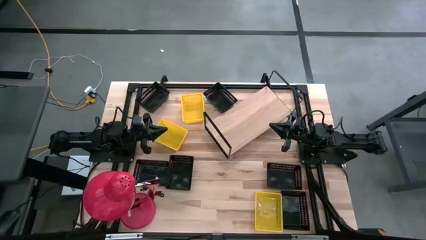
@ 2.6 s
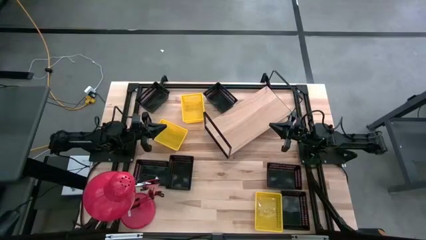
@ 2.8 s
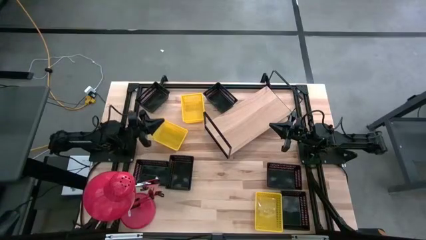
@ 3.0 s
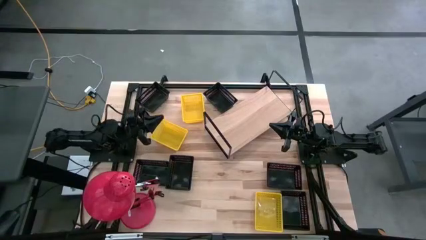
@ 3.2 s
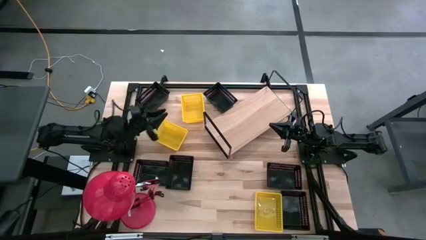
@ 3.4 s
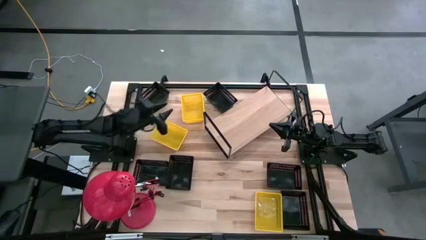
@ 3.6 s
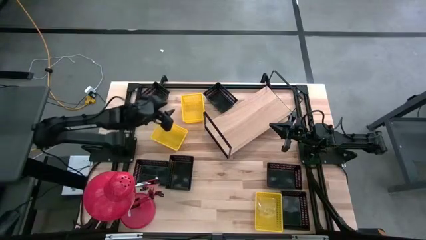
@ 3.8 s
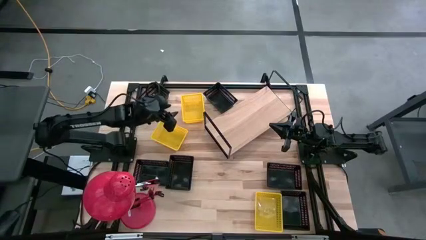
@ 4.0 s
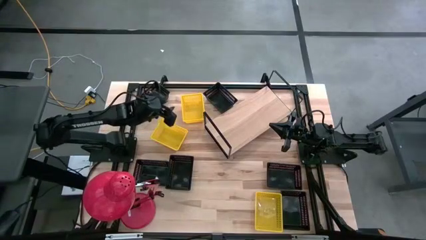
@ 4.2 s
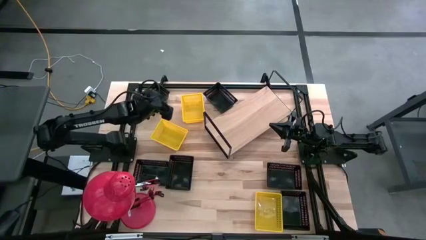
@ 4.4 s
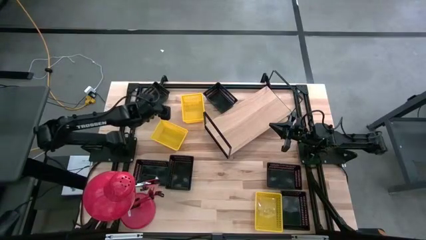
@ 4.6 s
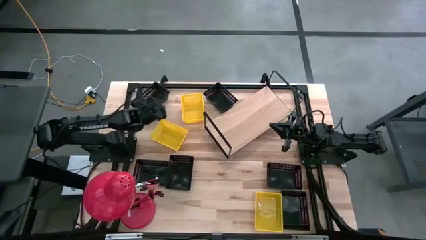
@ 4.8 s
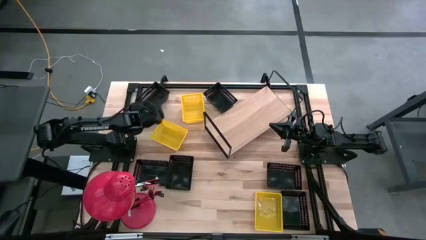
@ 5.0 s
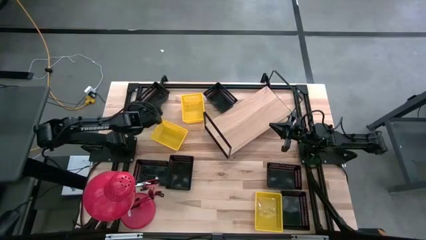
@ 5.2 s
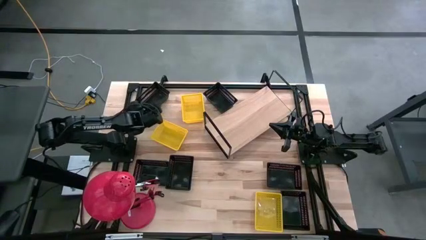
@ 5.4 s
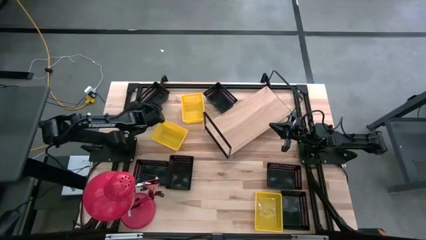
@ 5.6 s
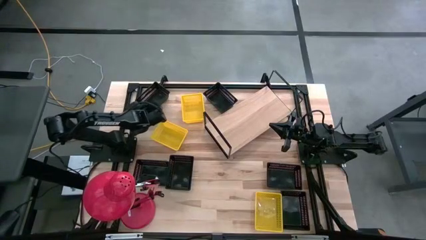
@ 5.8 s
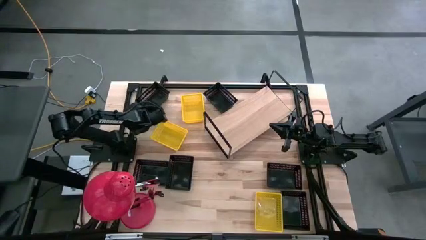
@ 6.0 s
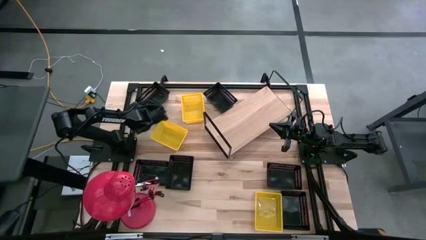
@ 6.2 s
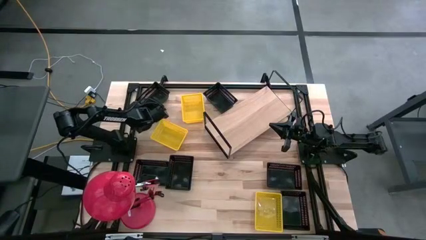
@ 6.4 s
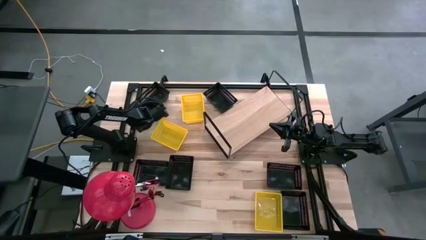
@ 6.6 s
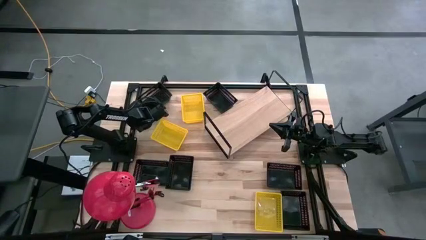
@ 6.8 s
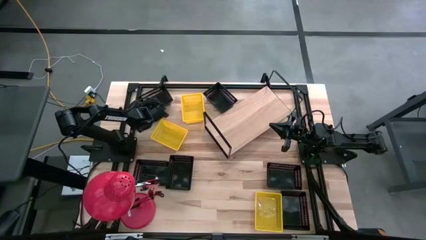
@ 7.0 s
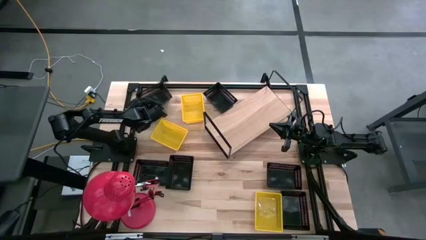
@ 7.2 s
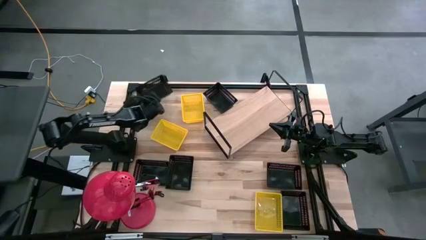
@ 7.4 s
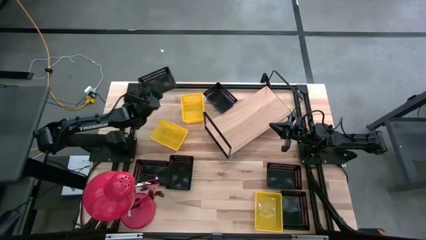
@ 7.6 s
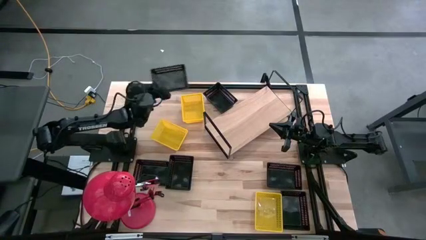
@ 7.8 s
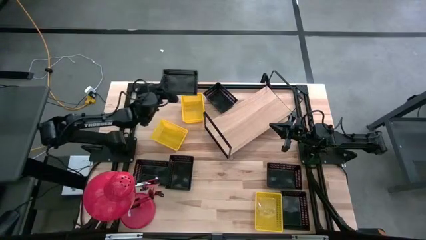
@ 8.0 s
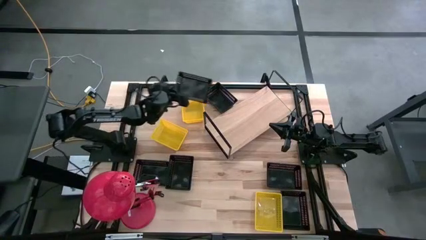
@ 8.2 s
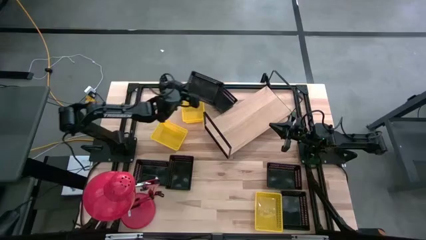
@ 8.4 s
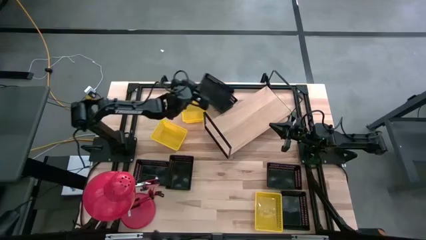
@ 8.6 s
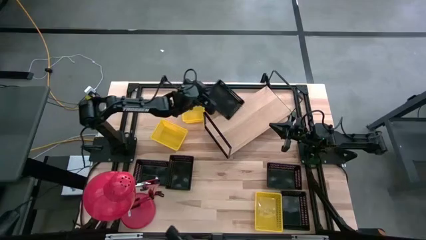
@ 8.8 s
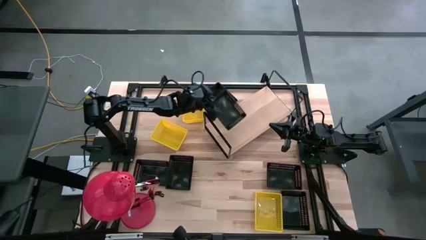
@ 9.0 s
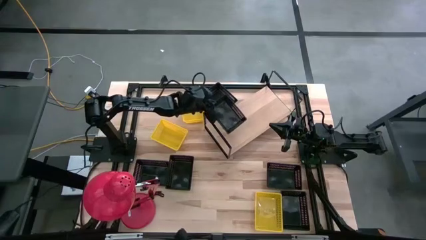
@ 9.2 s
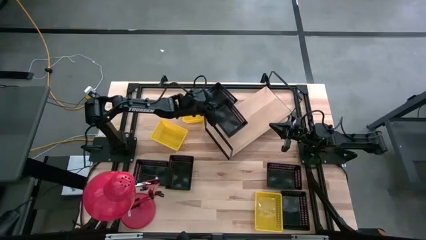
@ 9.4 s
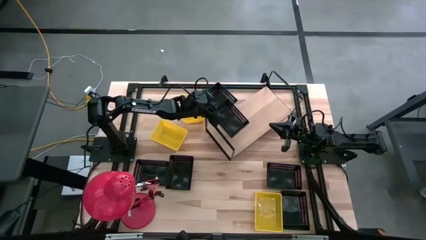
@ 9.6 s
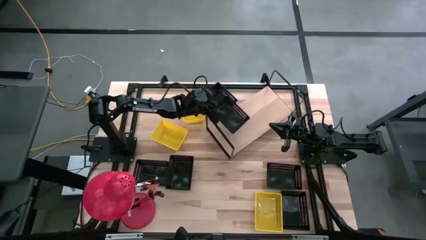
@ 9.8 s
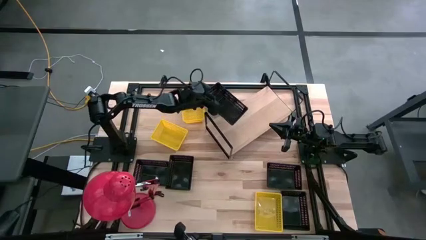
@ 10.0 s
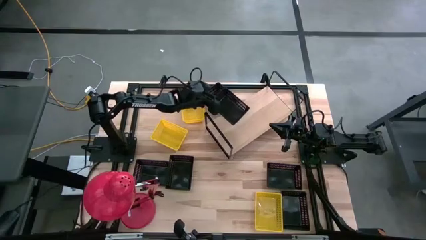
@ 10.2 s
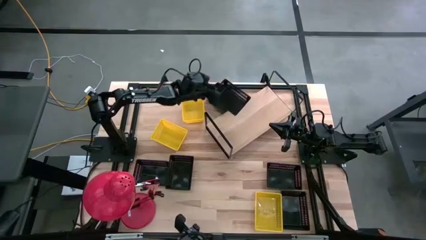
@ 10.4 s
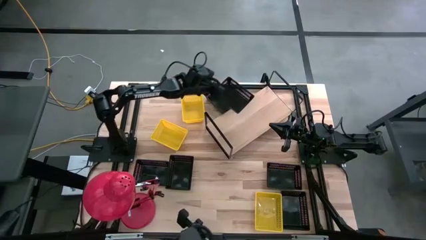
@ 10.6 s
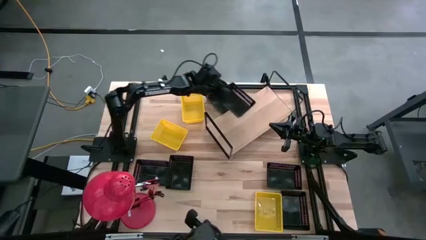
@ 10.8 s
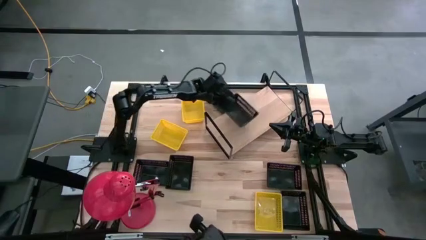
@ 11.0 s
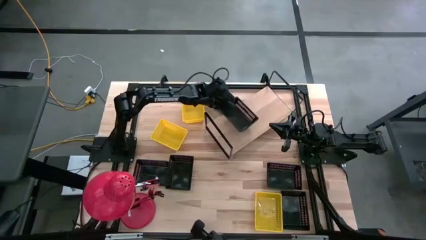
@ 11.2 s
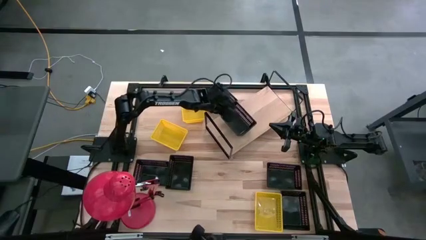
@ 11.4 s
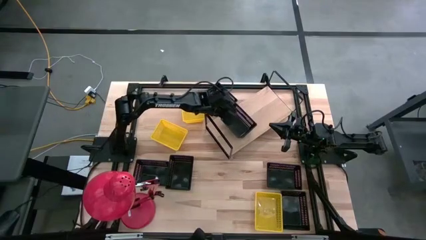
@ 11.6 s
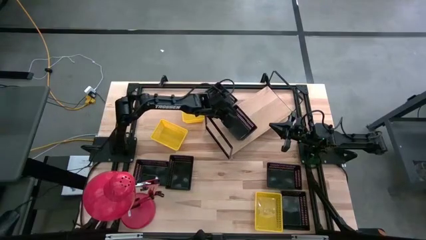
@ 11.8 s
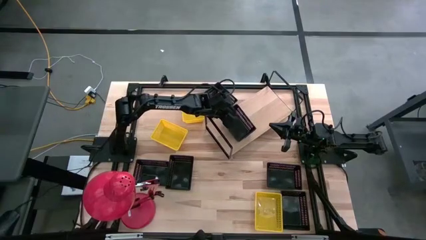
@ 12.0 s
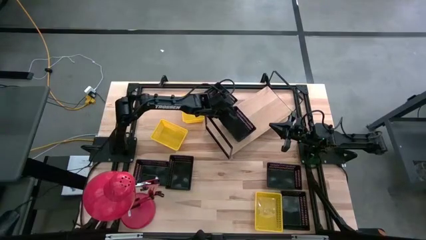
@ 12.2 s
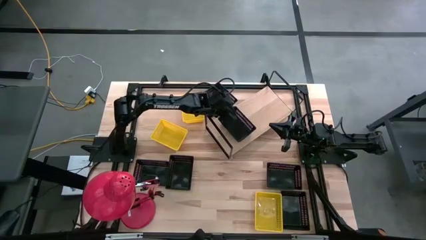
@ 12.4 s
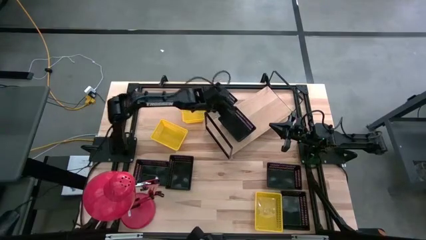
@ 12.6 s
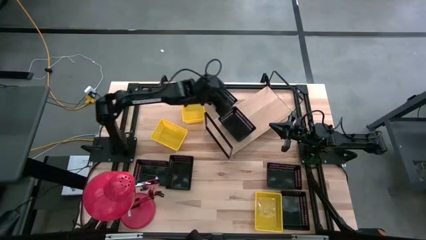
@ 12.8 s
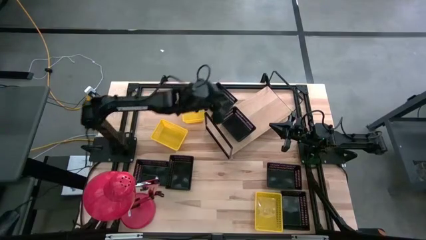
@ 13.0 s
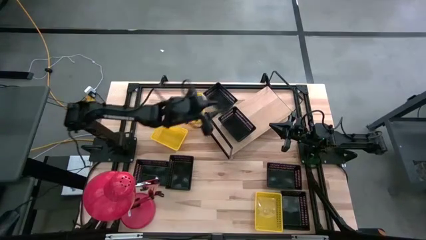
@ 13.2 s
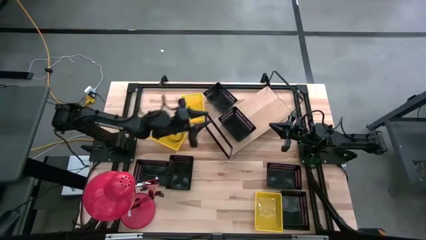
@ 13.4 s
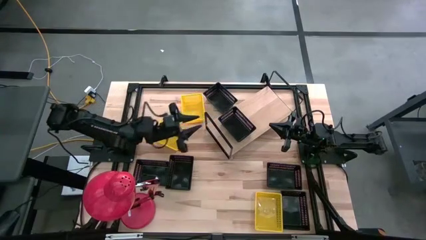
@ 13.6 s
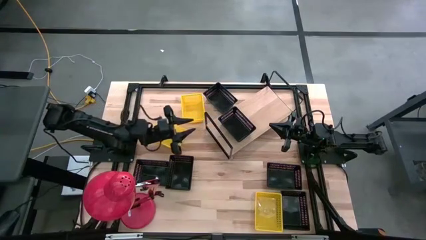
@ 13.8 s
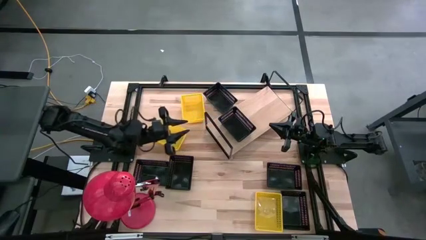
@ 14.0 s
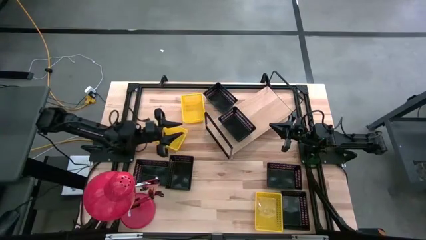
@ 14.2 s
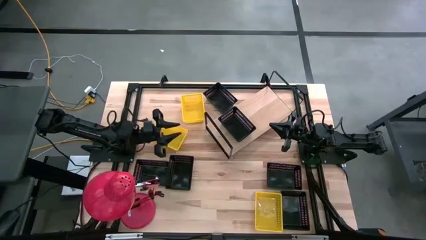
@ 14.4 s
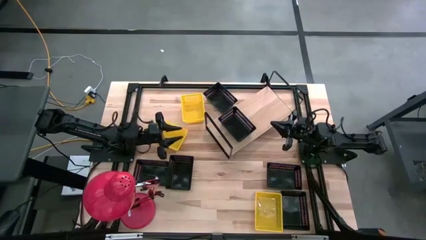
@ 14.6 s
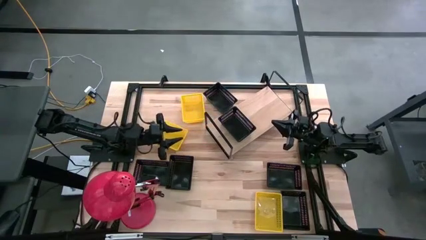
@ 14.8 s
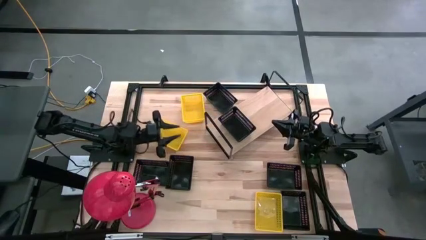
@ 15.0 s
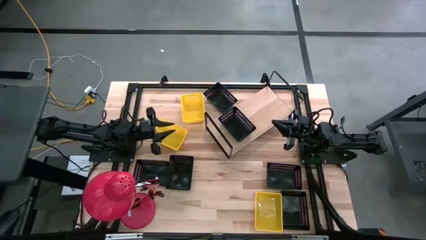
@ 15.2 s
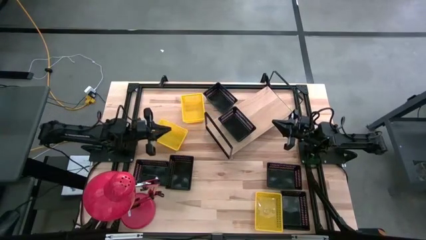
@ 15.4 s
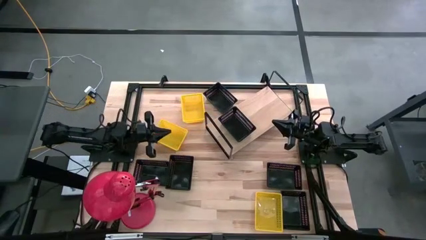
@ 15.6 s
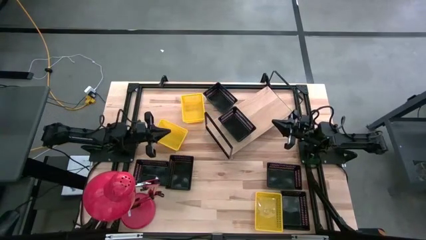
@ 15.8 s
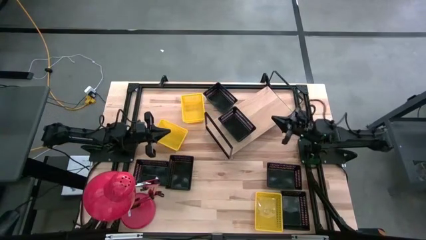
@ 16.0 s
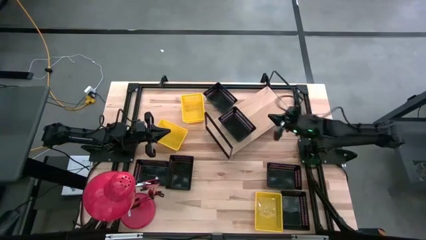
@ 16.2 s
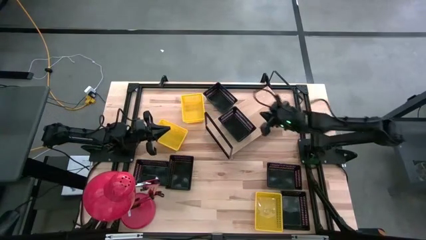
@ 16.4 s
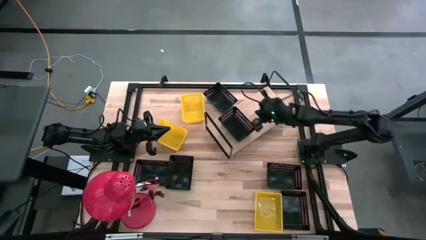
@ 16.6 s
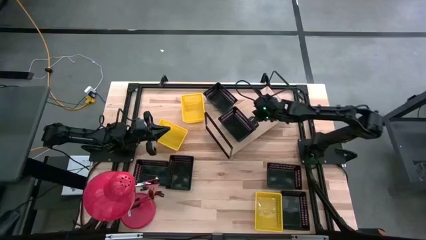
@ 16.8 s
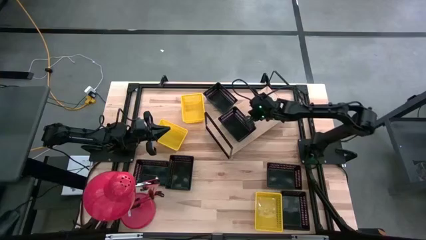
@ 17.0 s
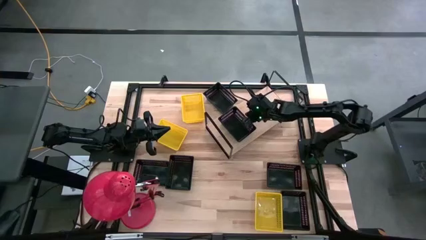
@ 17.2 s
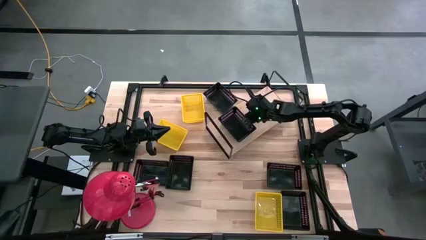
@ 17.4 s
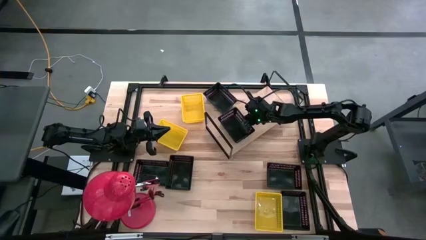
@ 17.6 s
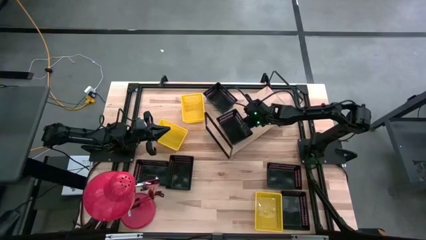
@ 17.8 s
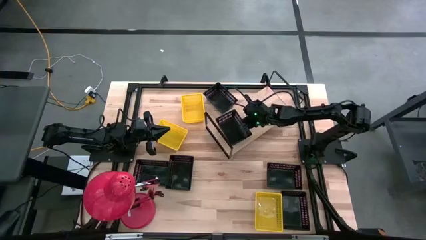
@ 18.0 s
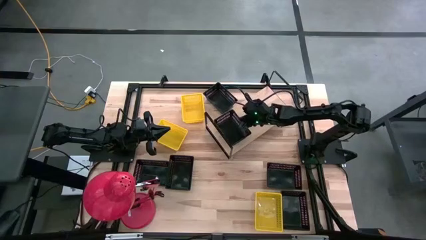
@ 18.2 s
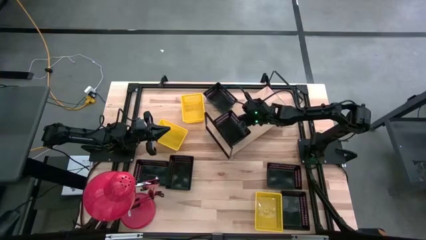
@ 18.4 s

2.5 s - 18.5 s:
Task: Stack baskets on shelf by color
Put the black bin on the shelf
